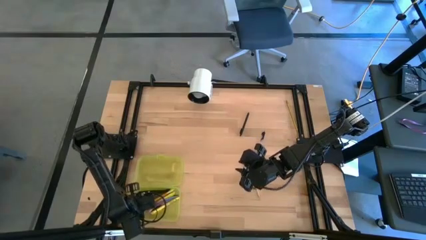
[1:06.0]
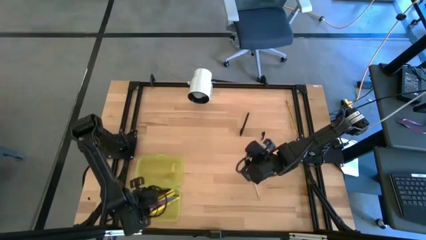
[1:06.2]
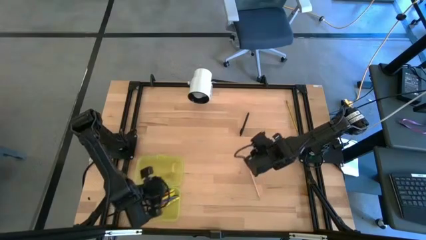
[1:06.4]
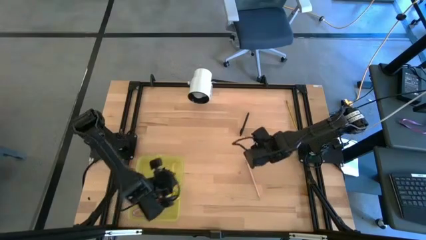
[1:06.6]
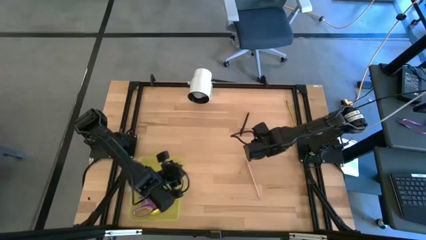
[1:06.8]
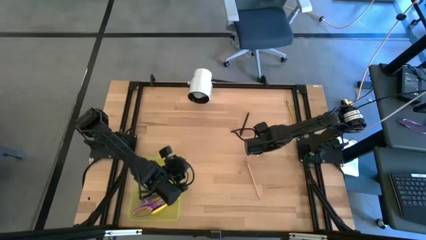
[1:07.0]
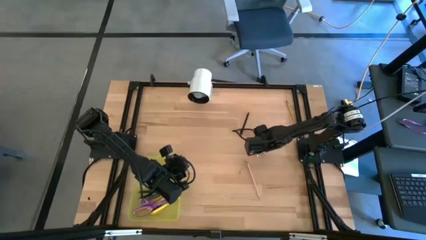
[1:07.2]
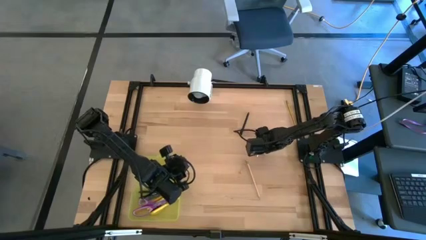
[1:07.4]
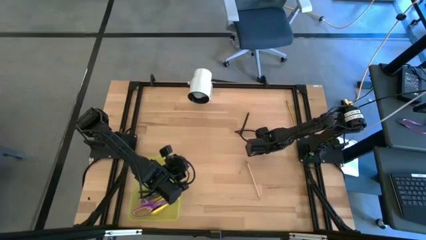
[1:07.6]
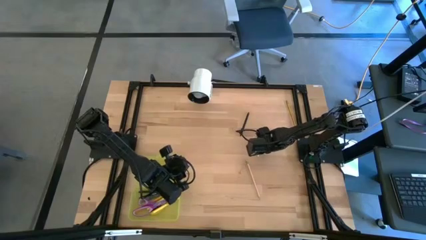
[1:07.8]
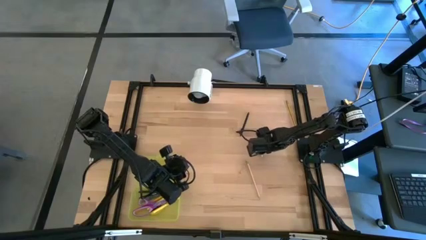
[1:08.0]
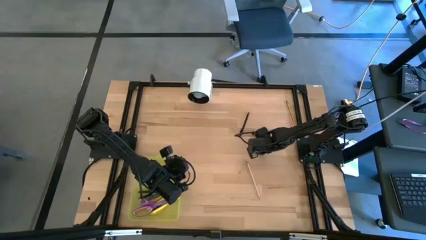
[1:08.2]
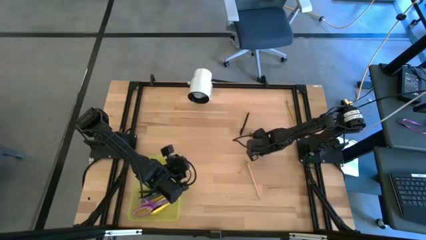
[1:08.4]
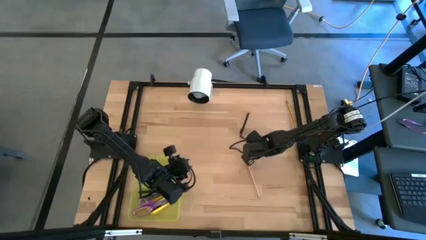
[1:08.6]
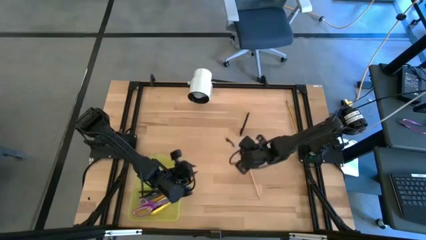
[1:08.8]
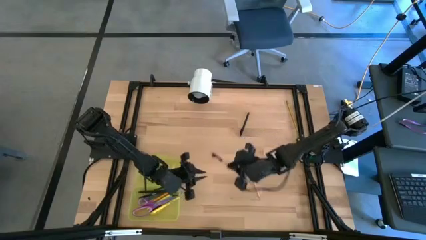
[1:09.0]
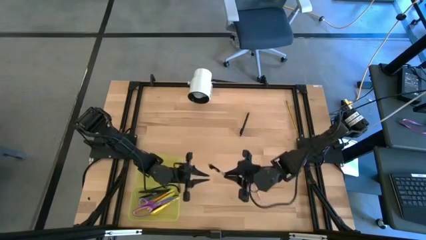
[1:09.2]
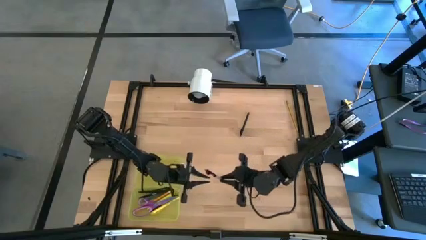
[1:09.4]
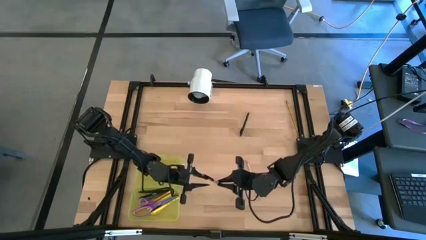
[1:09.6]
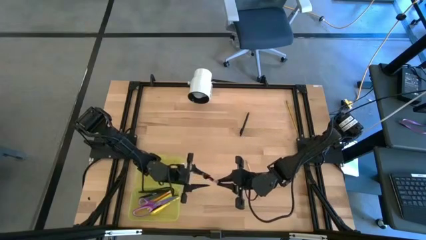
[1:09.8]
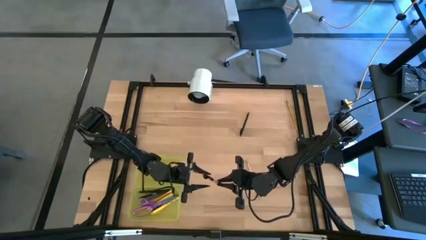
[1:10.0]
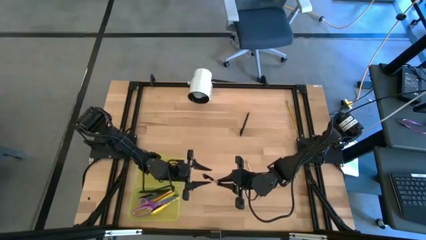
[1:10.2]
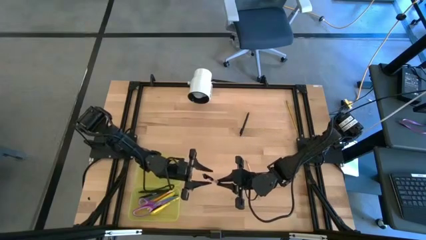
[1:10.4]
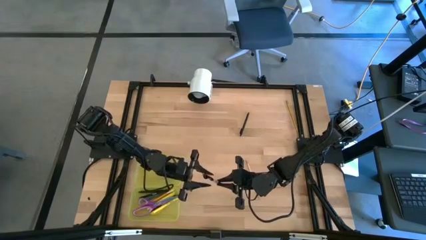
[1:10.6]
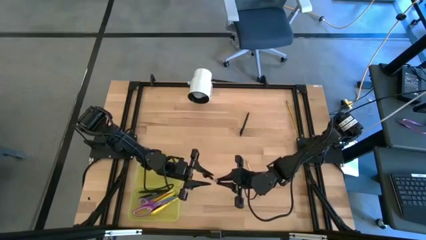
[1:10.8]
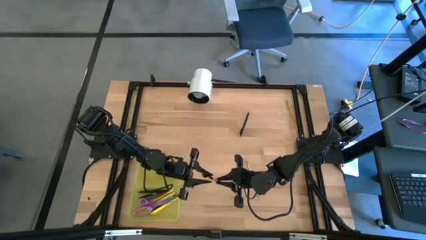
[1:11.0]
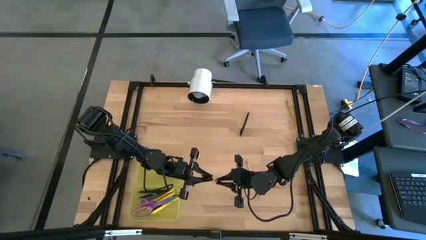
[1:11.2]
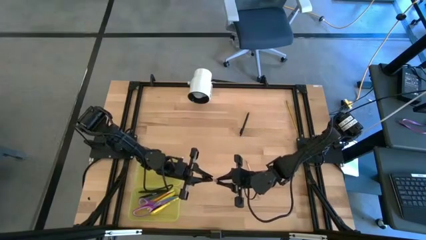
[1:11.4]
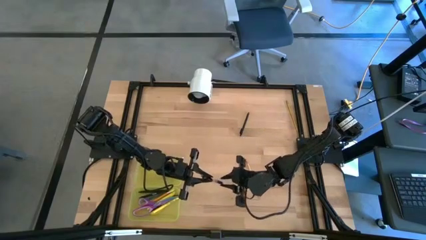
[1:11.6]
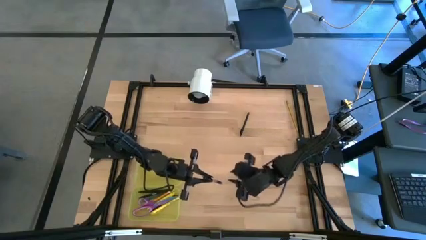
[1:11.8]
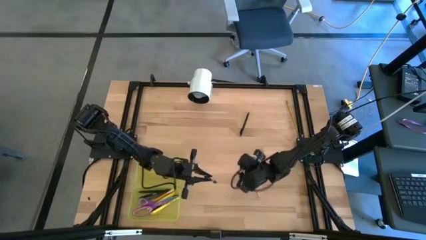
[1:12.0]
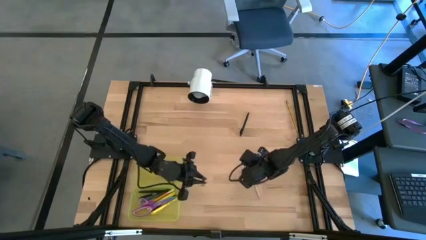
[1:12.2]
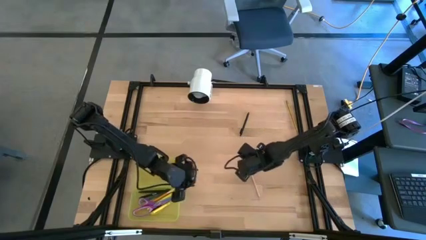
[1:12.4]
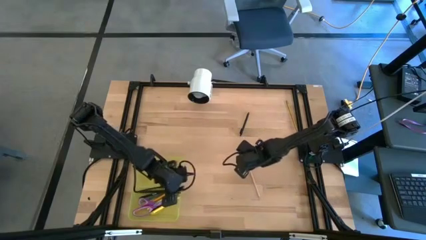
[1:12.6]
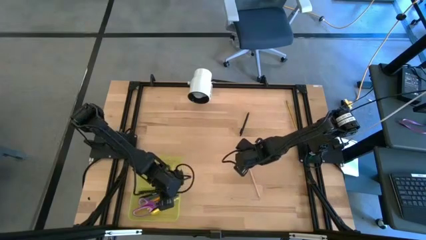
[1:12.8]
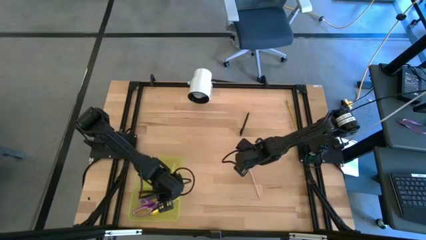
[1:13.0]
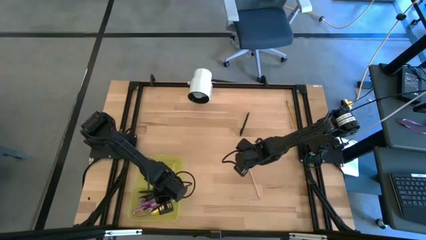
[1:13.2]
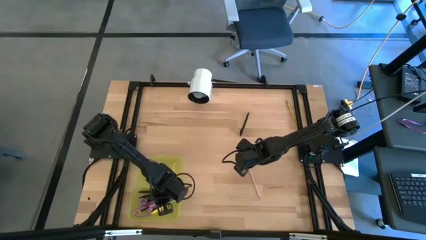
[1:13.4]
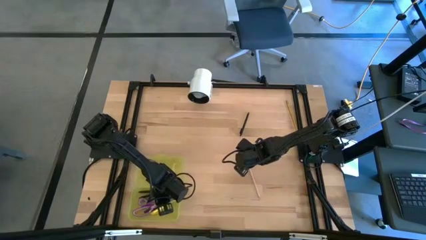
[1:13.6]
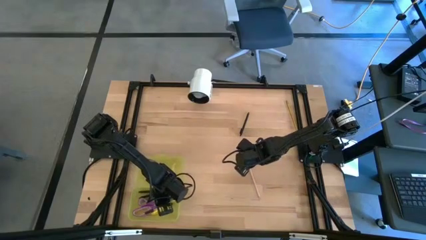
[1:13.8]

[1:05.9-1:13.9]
Task: Pick & place school supplies into a supply box
Put the black pen into the yellow supply box

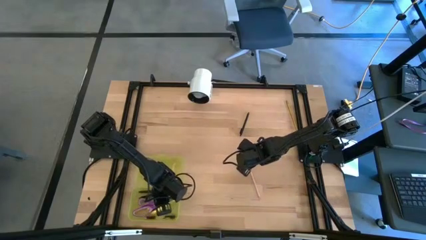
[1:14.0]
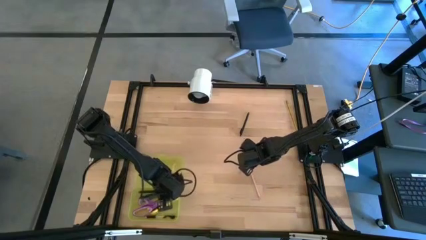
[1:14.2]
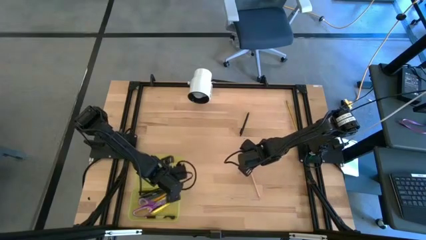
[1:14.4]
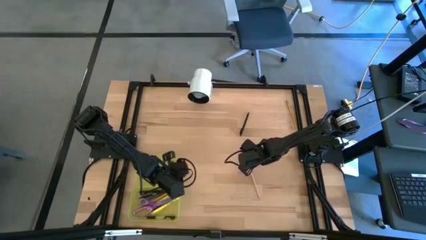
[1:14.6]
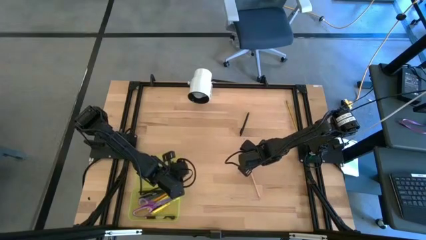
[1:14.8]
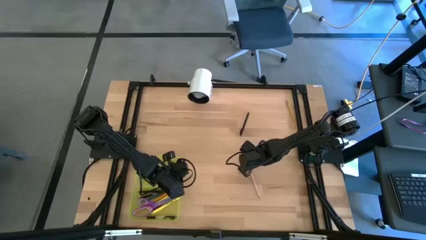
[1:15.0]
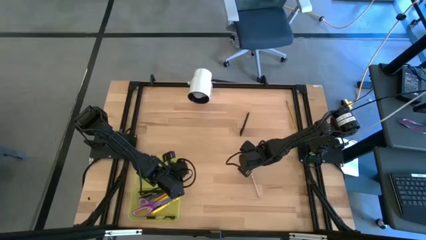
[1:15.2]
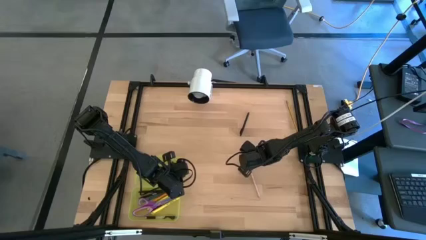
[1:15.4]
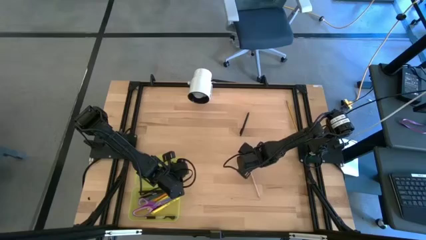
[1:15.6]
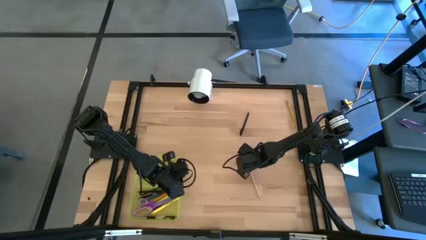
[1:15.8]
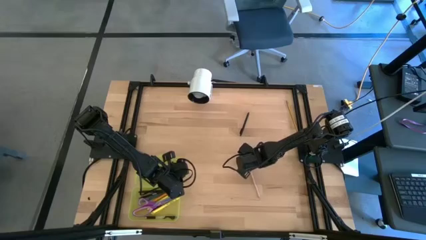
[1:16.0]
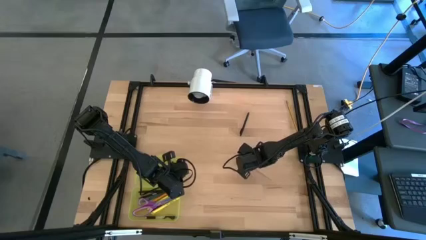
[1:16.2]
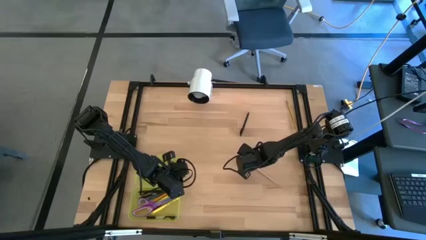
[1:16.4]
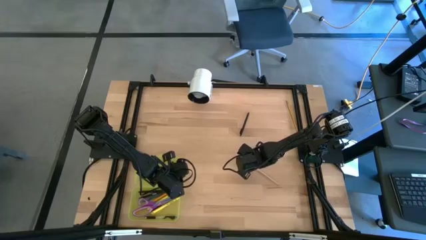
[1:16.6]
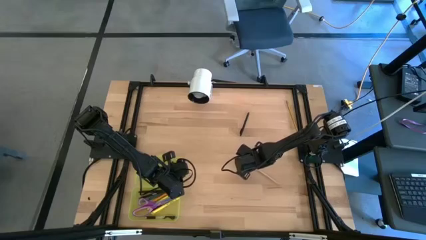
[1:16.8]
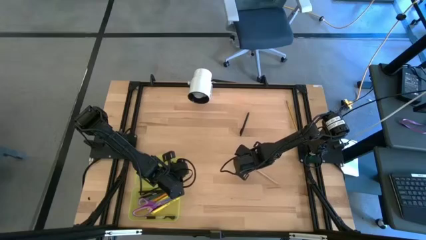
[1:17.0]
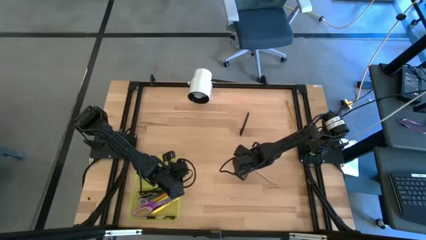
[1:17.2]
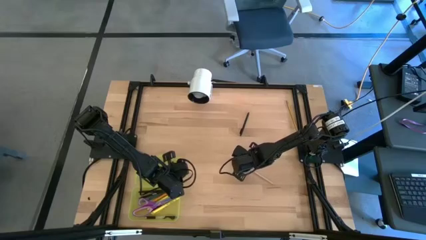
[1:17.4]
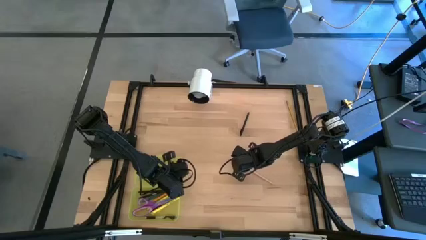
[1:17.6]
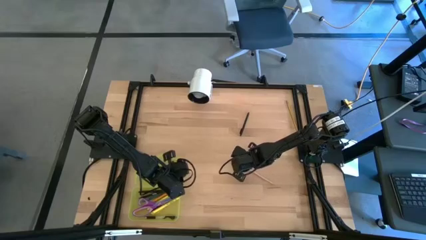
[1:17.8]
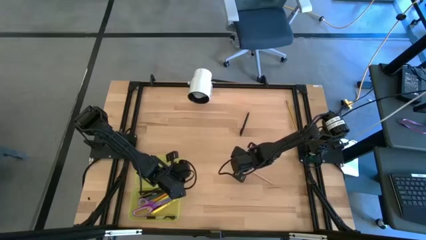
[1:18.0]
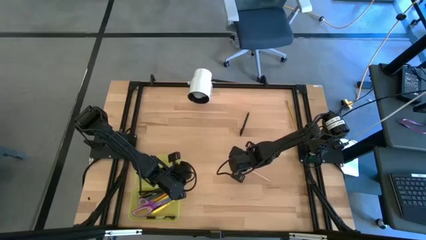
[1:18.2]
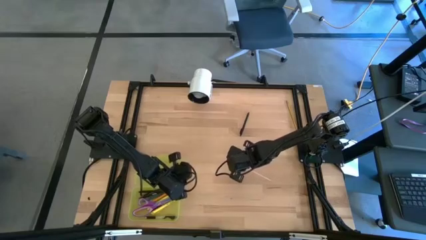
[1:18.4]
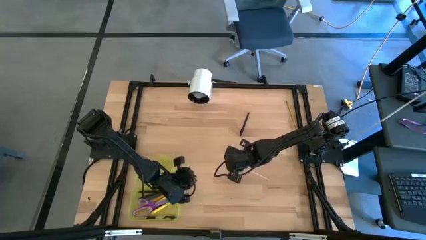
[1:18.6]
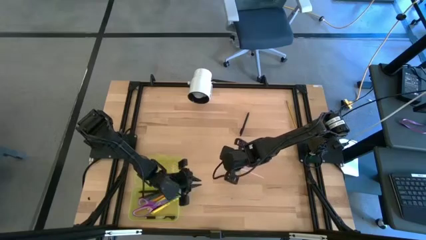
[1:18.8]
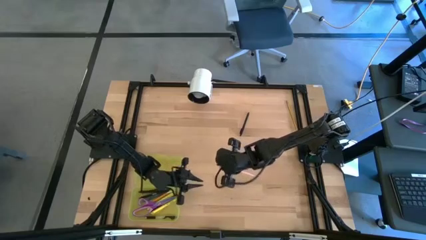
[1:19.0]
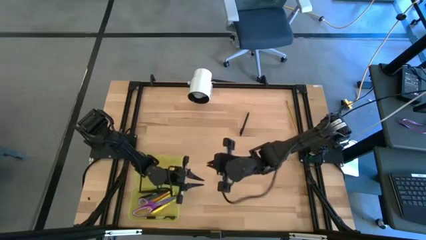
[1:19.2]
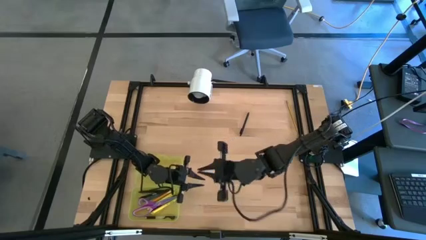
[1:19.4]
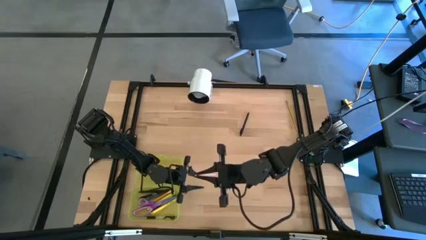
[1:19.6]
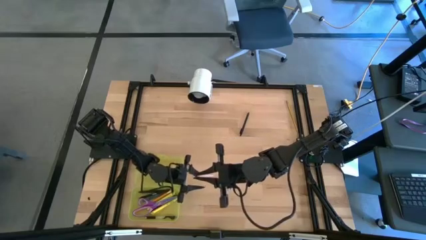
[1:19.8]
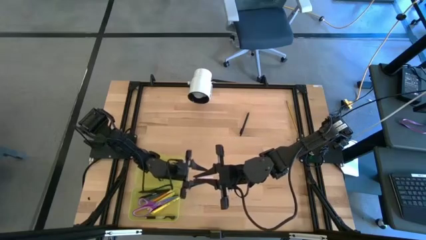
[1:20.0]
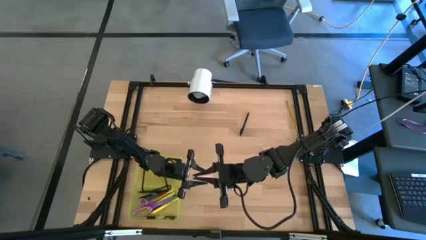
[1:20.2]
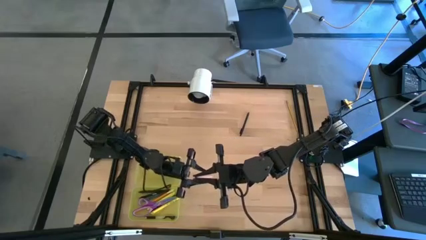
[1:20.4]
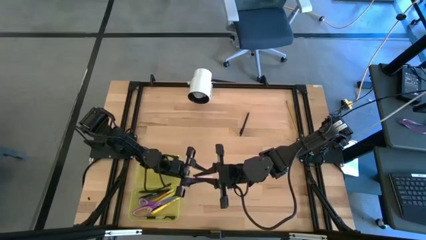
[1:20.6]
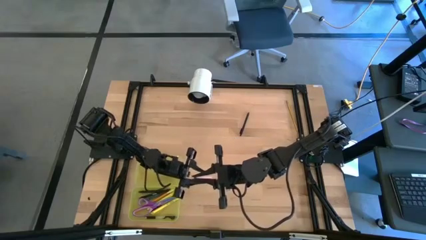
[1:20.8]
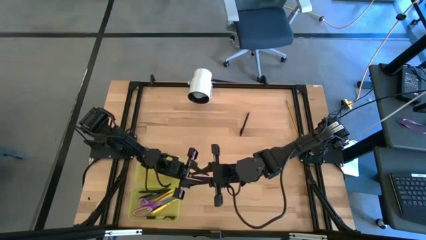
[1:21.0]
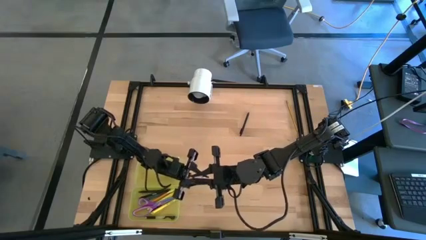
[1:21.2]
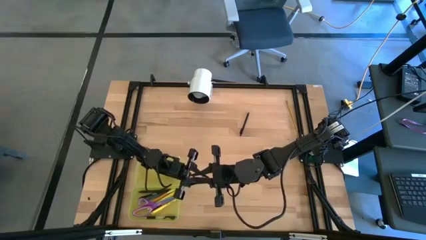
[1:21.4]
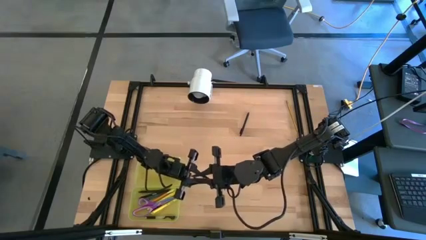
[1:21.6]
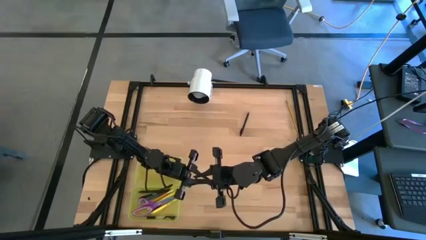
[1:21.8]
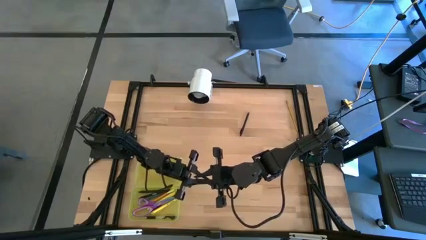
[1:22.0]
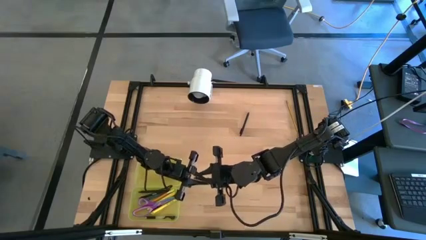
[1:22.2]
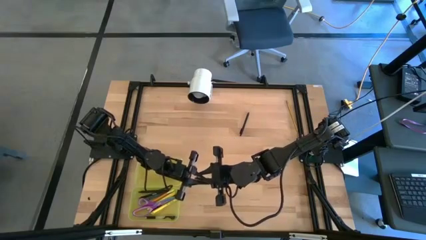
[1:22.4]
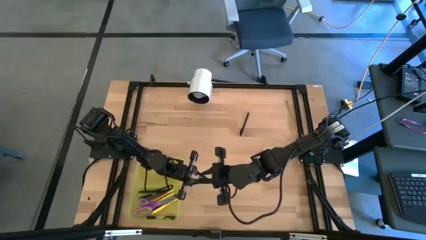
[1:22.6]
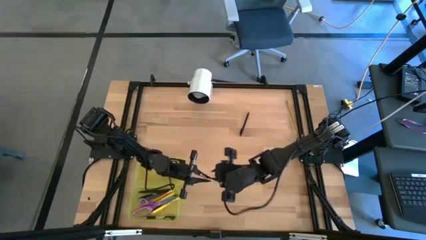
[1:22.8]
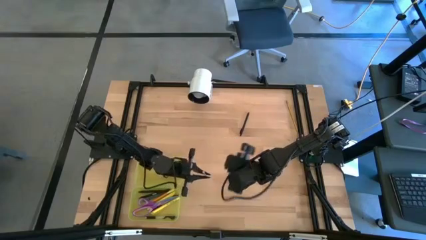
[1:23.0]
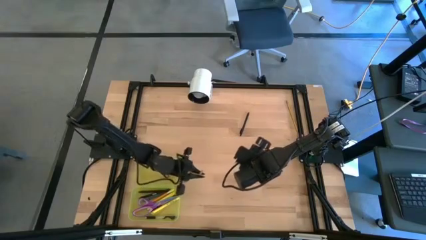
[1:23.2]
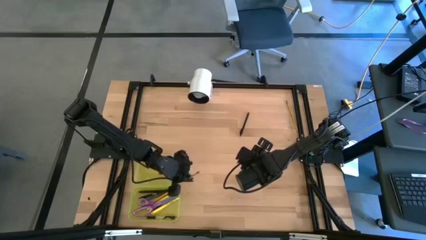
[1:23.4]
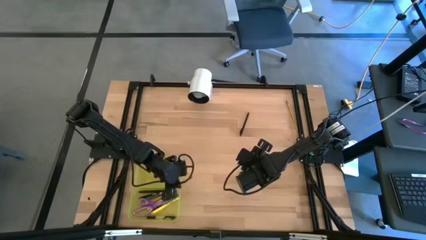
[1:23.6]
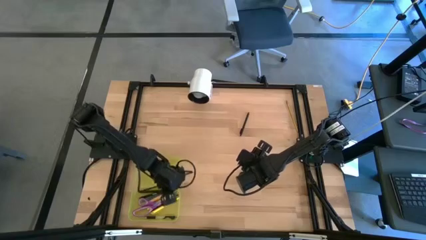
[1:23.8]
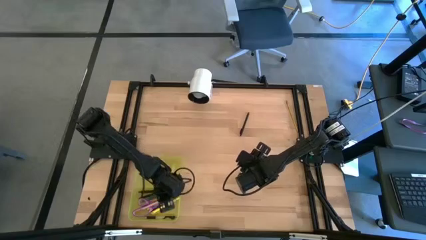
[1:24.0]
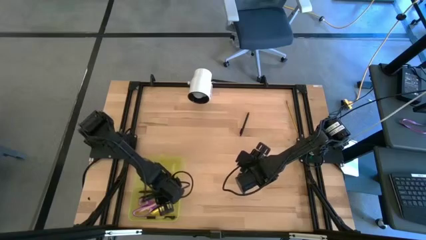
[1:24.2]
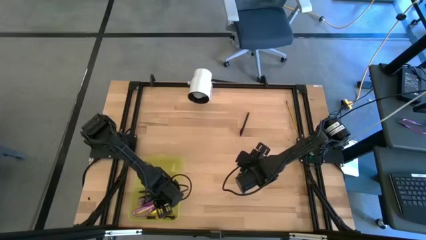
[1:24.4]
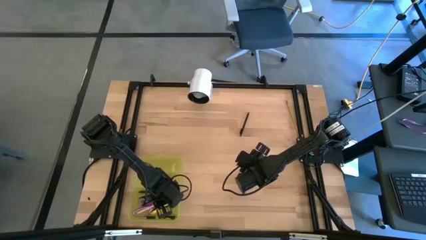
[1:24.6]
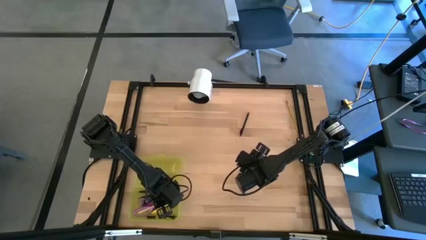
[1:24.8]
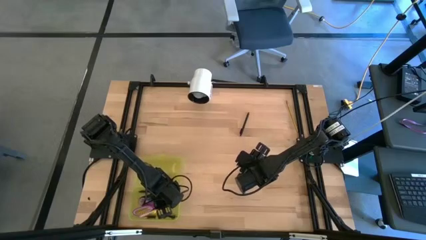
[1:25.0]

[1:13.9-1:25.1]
Put the pink pencil into the yellow supply box
